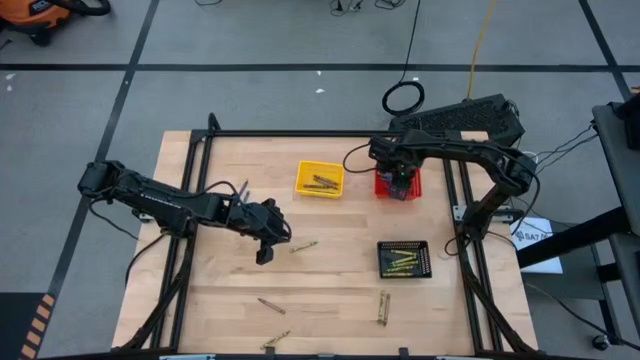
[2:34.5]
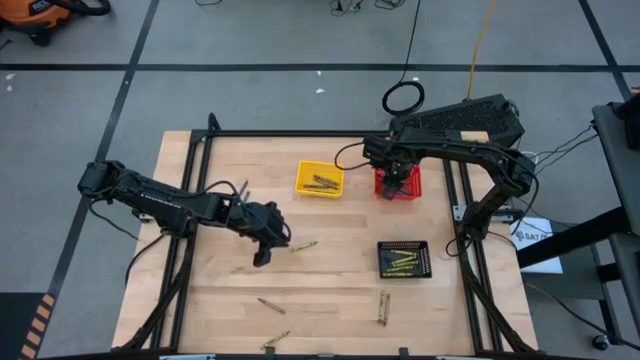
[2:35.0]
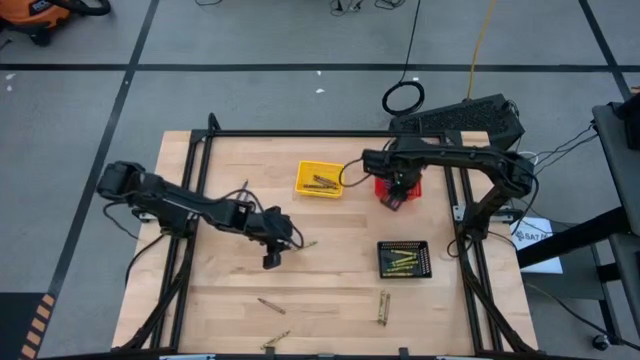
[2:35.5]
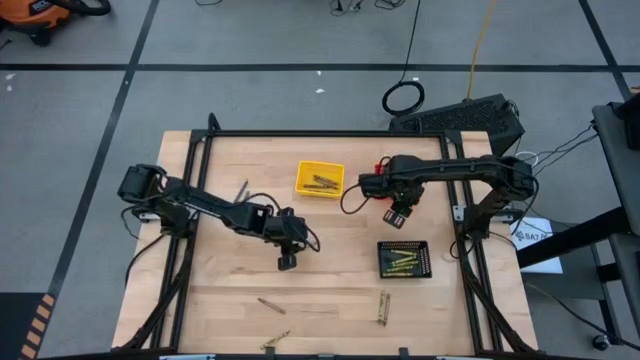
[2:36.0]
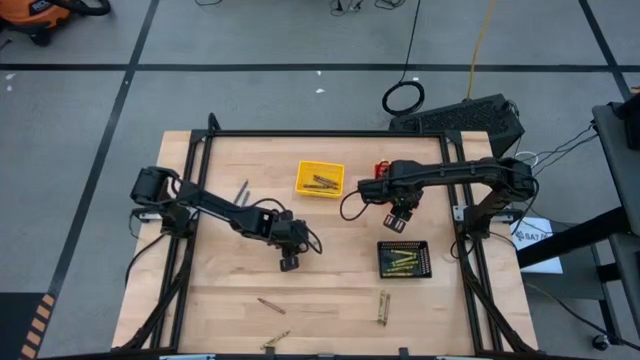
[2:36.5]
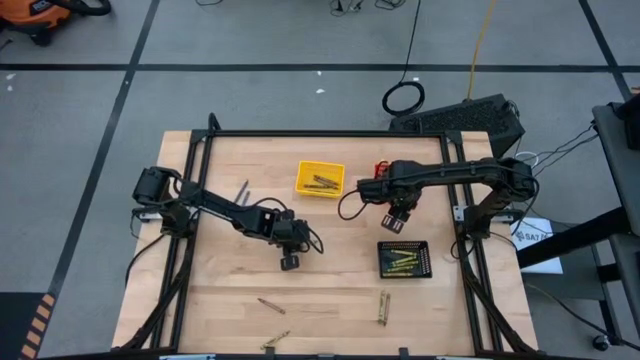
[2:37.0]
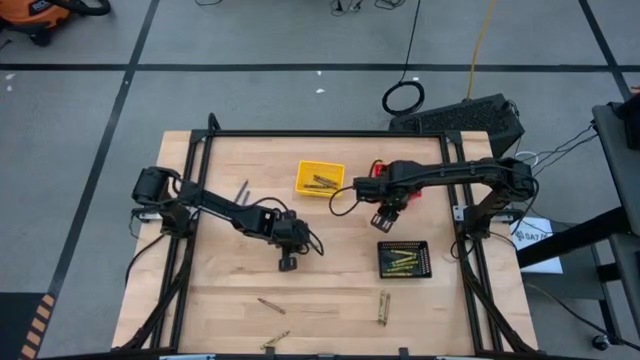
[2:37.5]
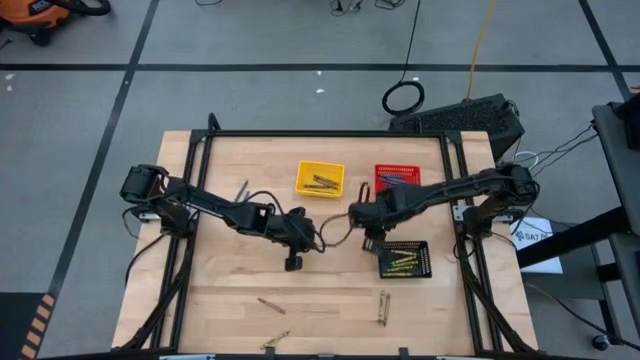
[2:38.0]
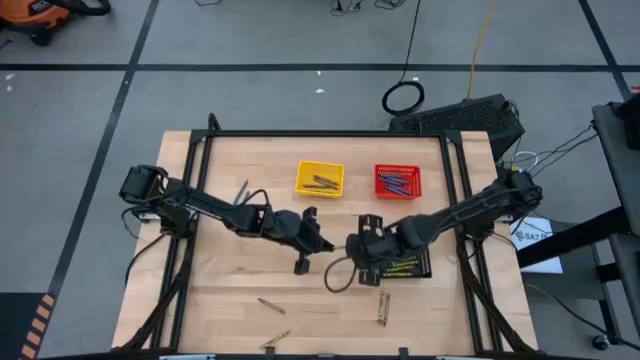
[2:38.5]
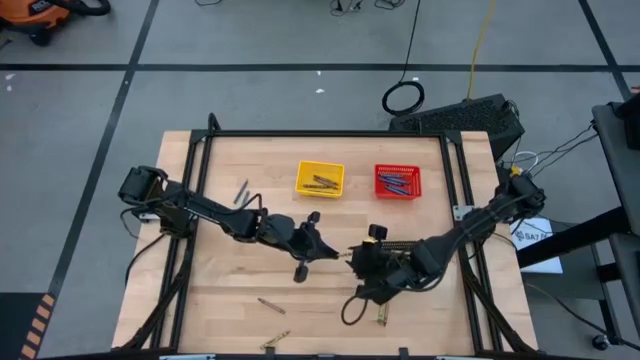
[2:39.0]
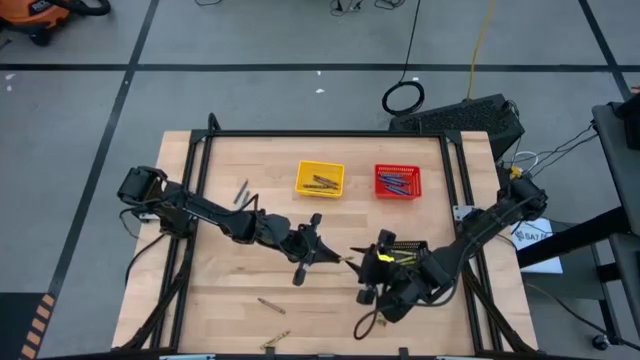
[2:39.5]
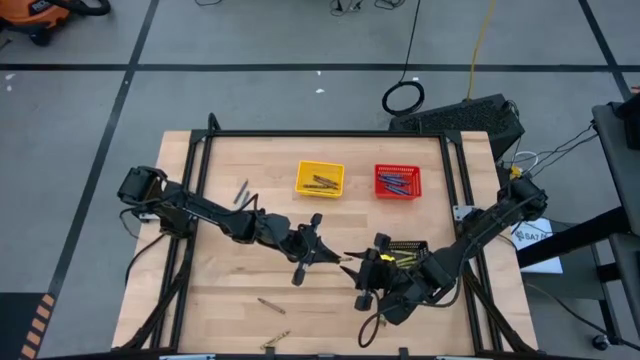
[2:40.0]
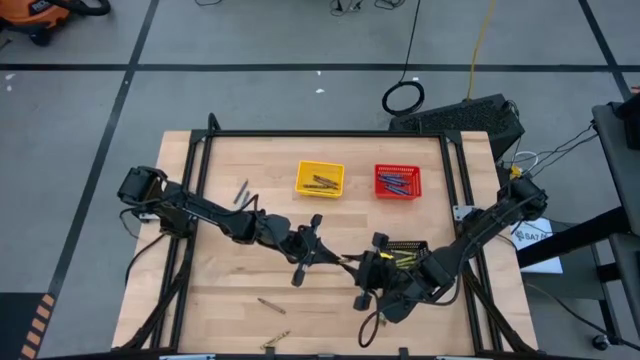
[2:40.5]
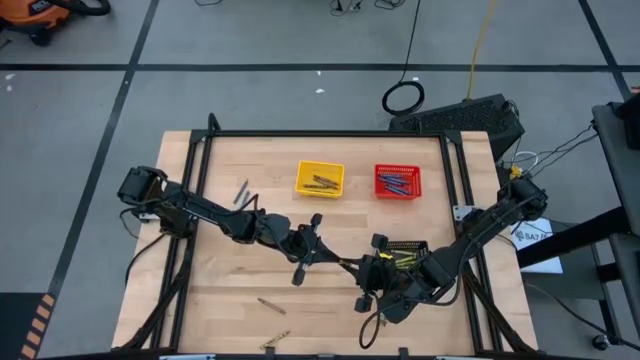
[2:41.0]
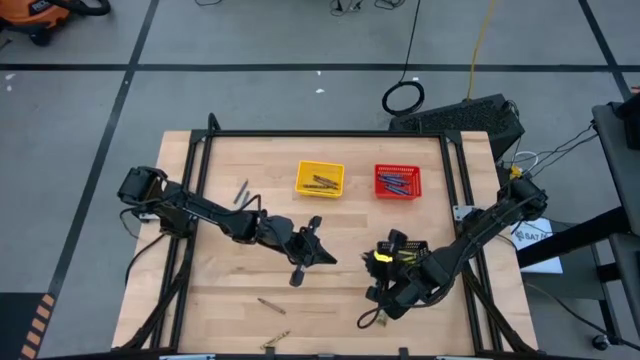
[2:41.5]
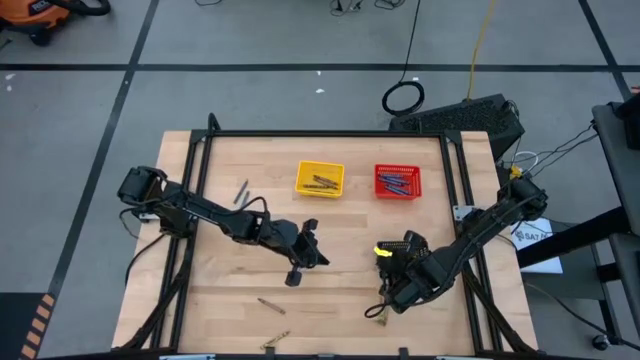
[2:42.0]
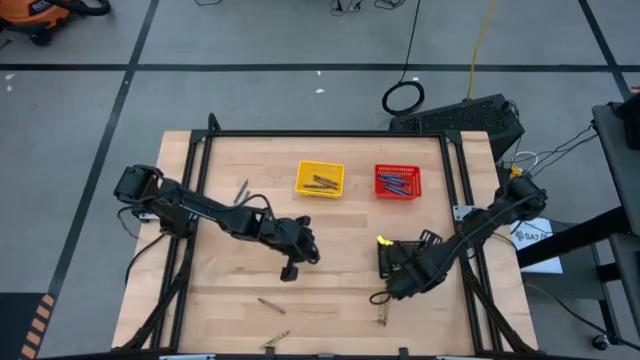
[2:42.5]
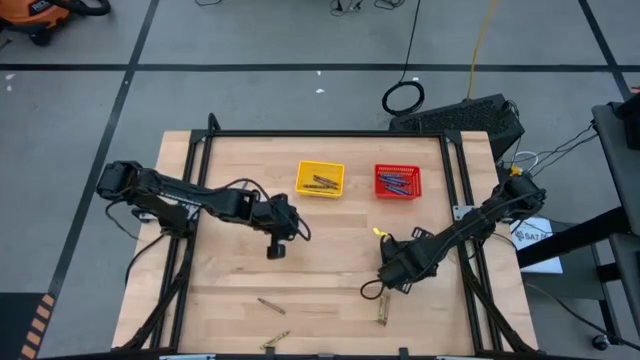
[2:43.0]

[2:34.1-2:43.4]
Task: Sort crayons
Put the green crayon into the black bin

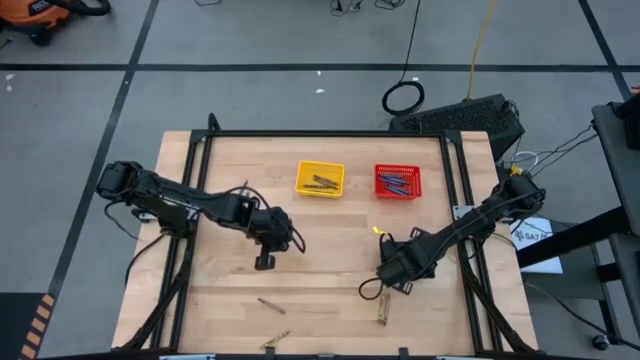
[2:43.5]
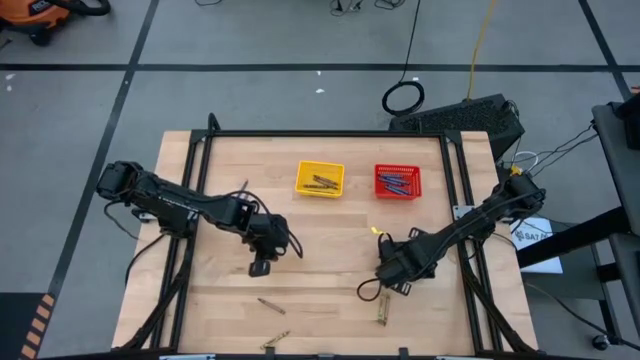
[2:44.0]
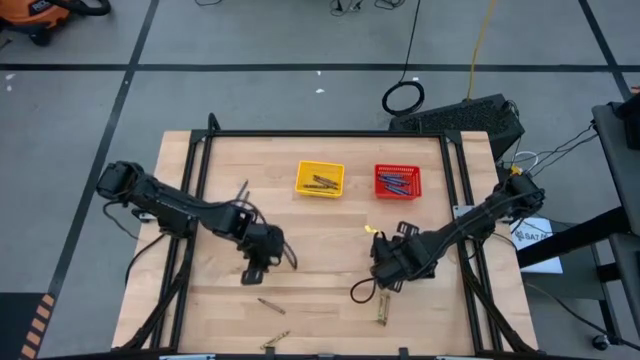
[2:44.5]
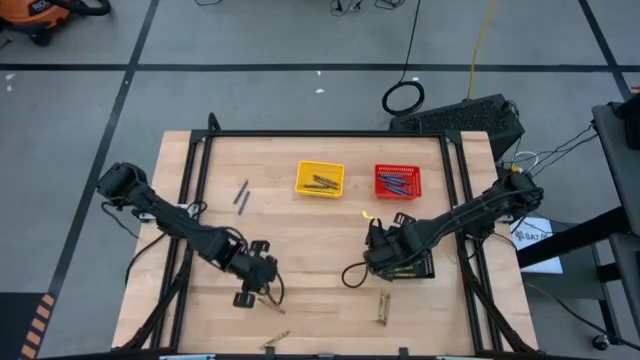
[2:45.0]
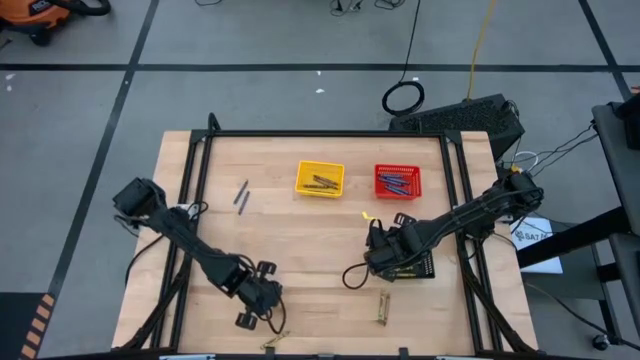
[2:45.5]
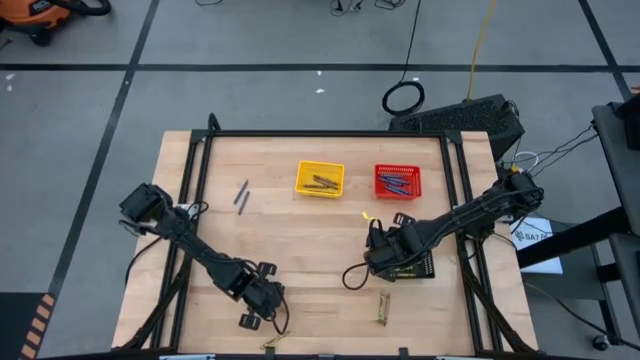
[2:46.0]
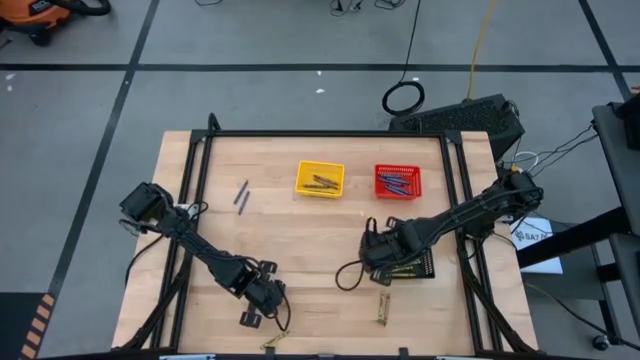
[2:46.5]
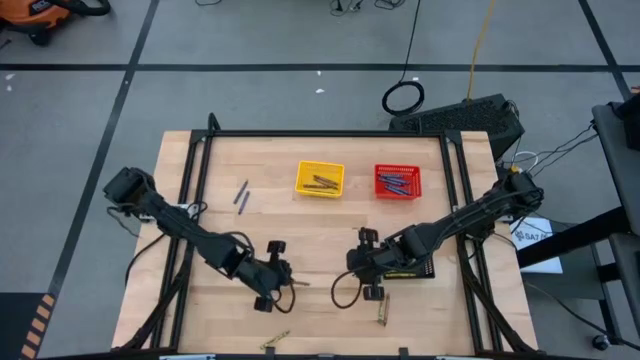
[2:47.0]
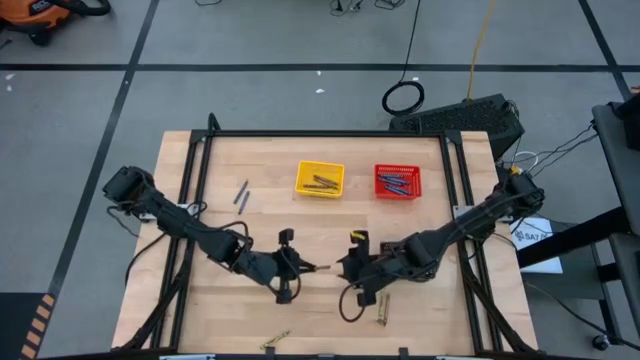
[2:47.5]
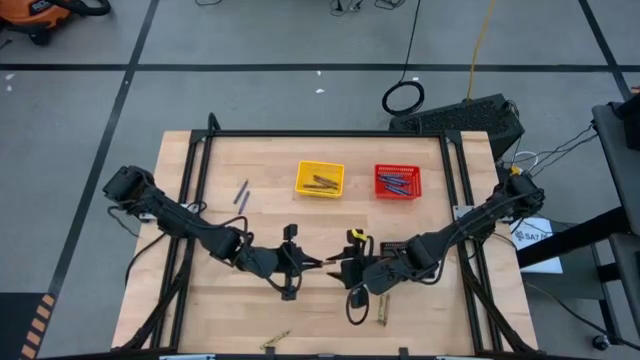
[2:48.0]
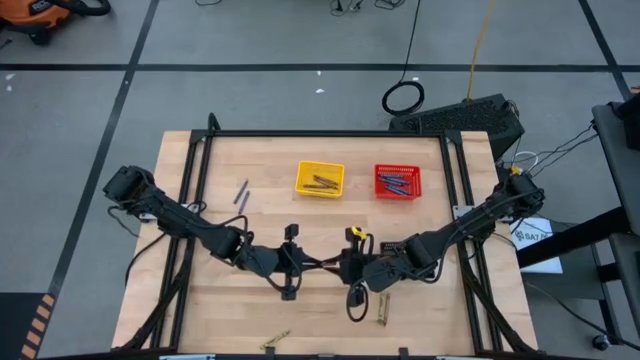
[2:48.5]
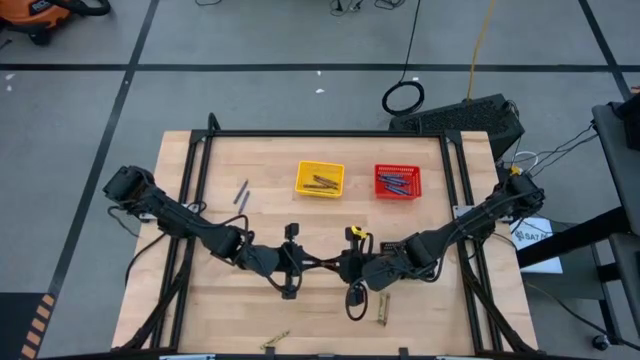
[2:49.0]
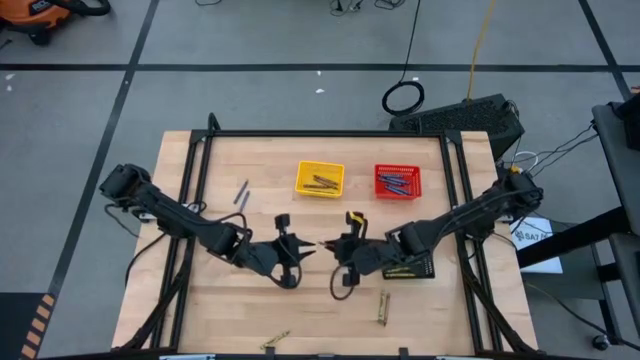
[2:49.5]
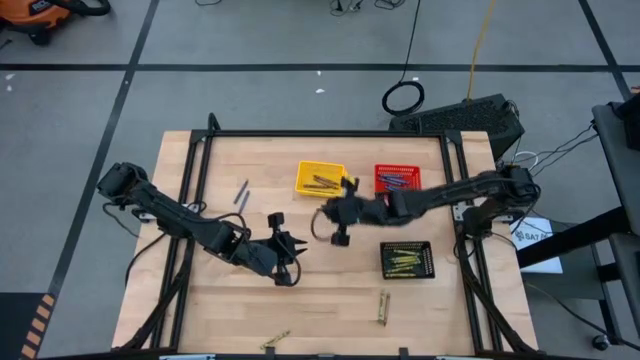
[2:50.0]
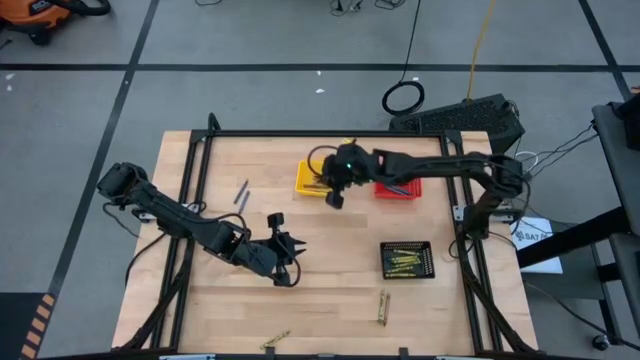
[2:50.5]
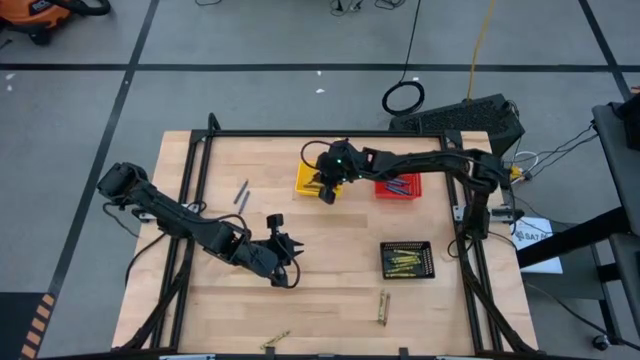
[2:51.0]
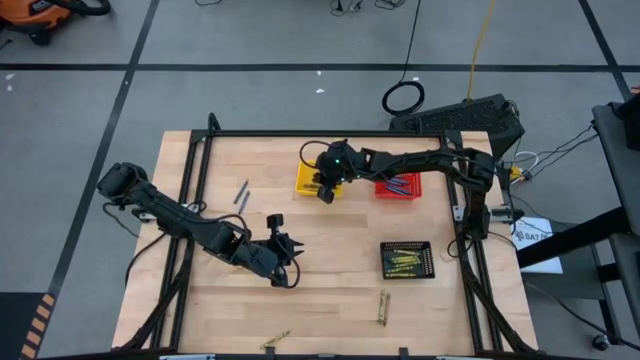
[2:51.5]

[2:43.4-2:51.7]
Put the brown crayon into the yellow bin

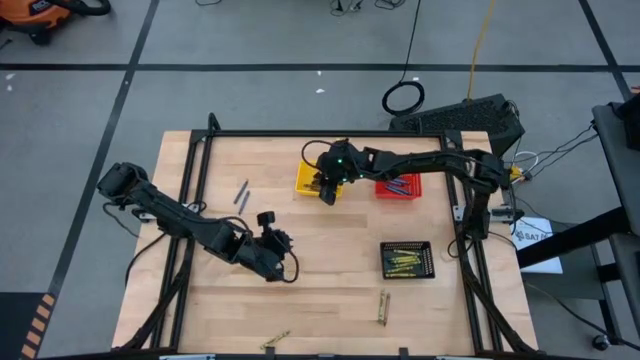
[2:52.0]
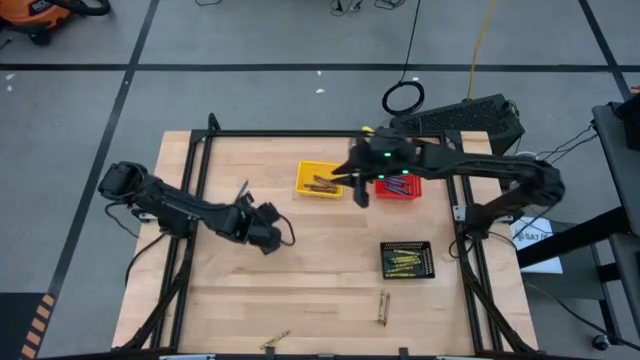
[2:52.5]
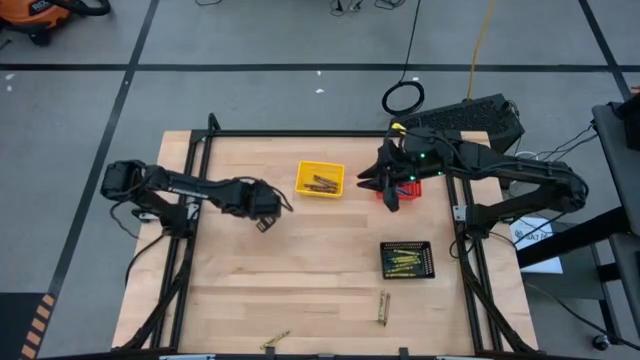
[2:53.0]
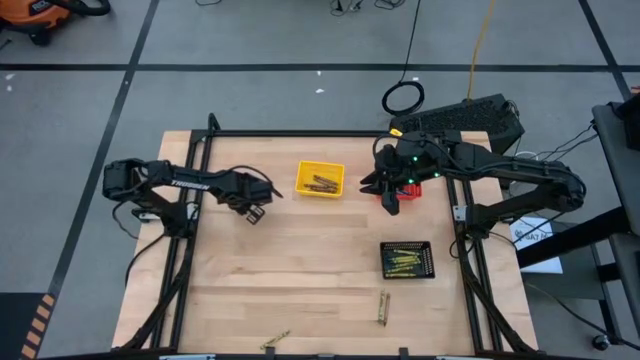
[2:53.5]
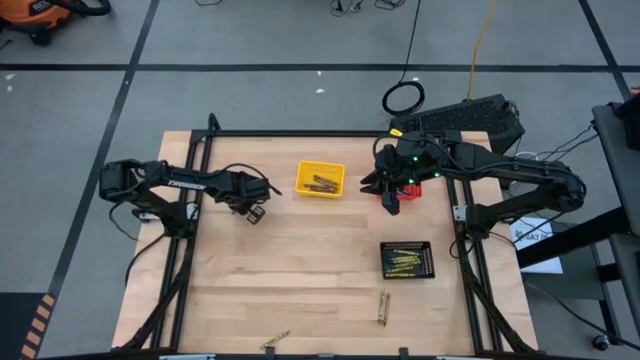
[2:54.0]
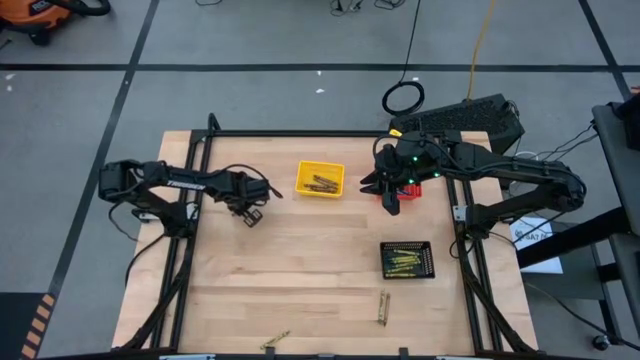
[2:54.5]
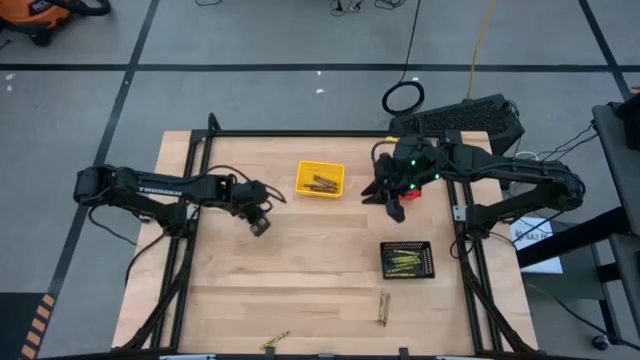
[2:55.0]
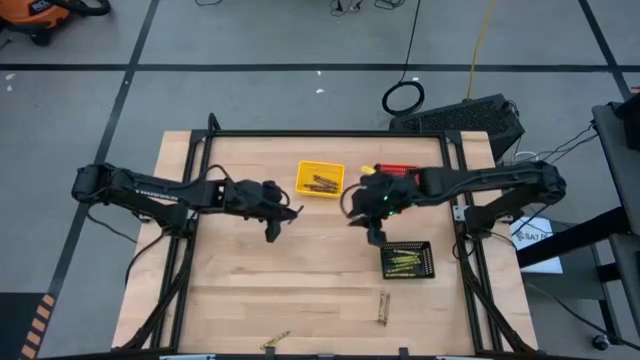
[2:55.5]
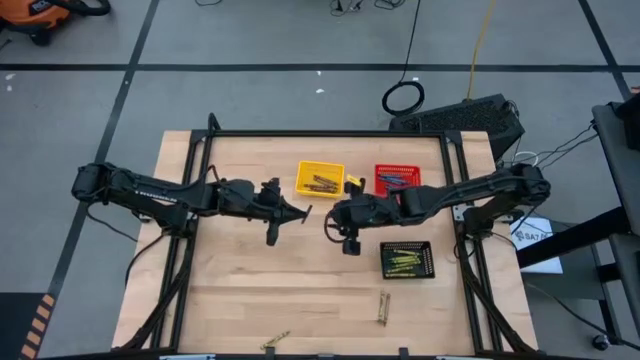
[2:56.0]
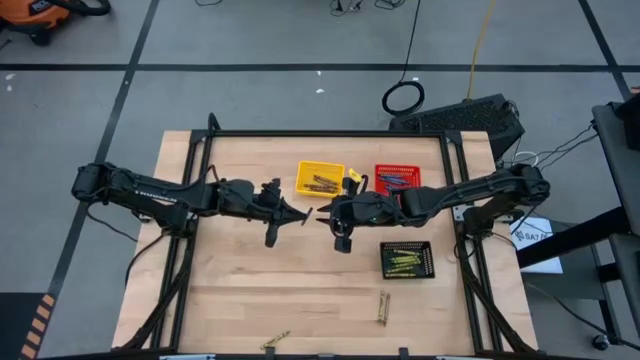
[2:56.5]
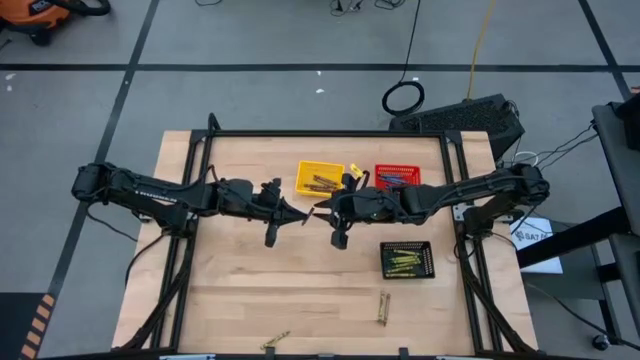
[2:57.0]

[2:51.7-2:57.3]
Put the blue crayon into the red bin
